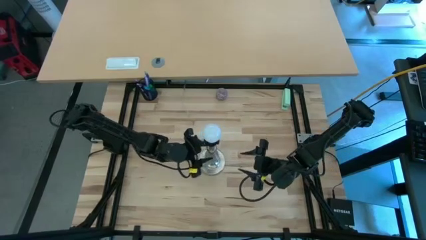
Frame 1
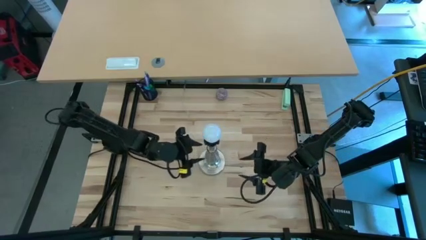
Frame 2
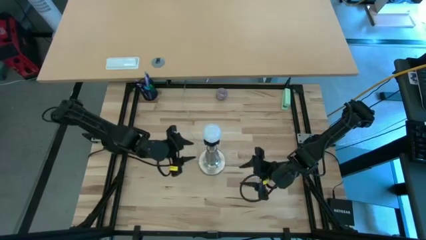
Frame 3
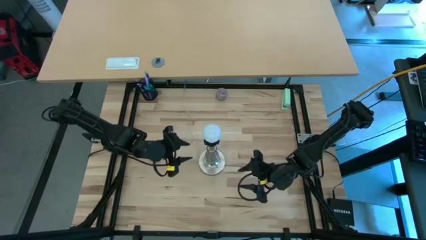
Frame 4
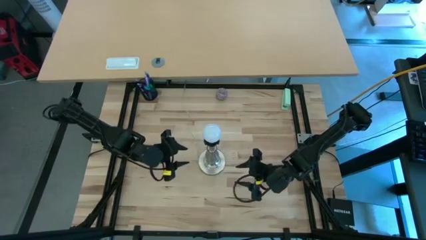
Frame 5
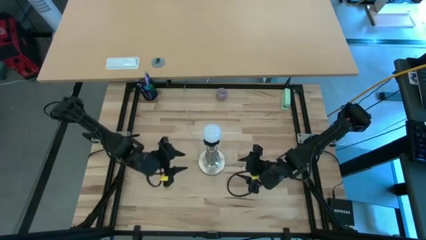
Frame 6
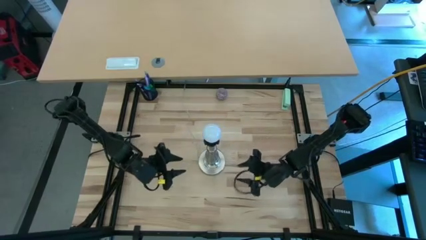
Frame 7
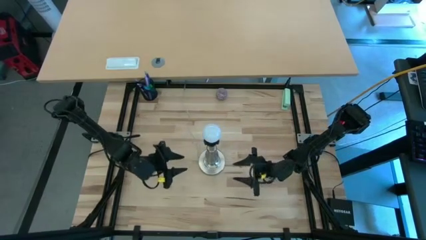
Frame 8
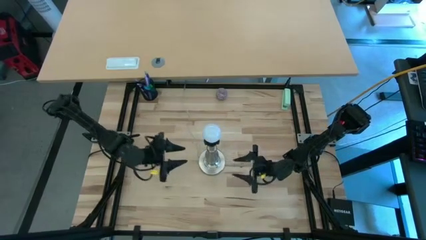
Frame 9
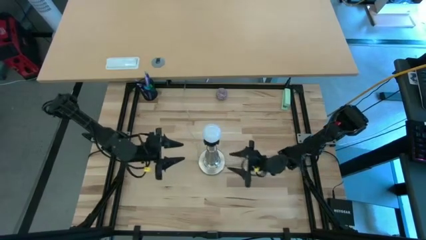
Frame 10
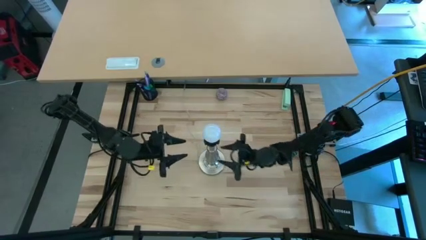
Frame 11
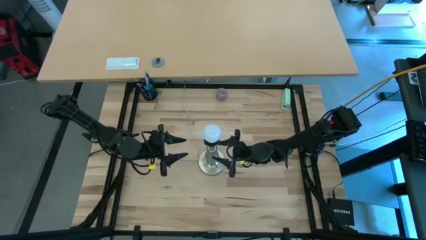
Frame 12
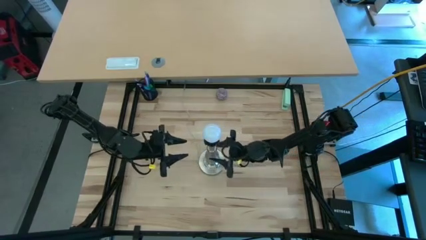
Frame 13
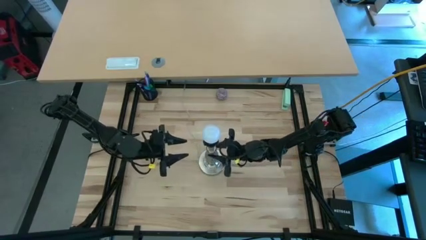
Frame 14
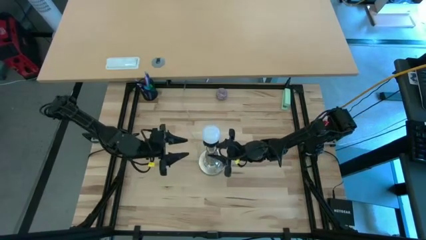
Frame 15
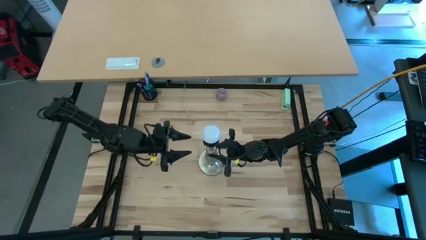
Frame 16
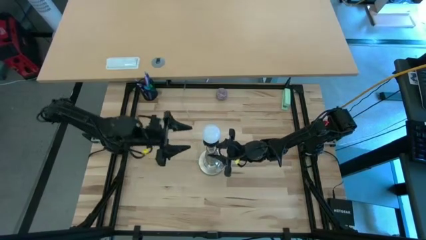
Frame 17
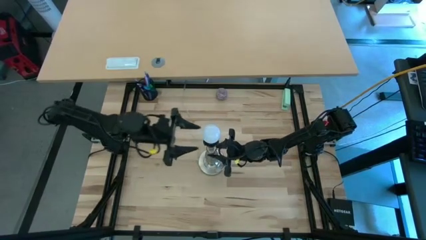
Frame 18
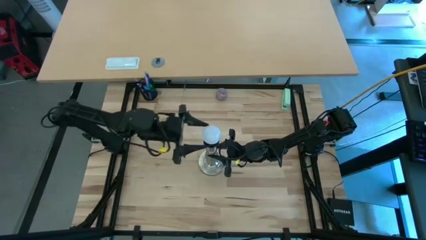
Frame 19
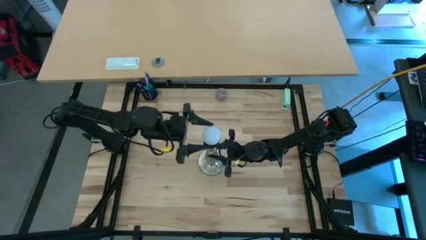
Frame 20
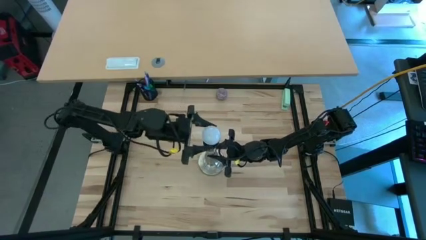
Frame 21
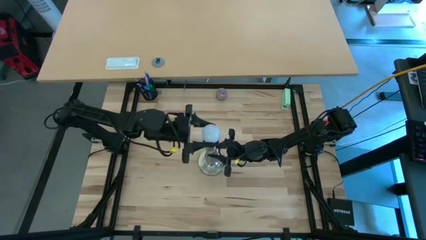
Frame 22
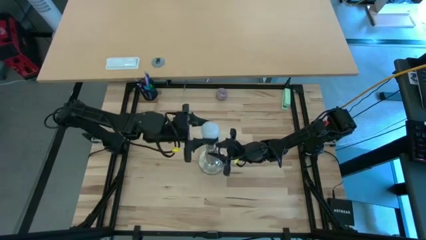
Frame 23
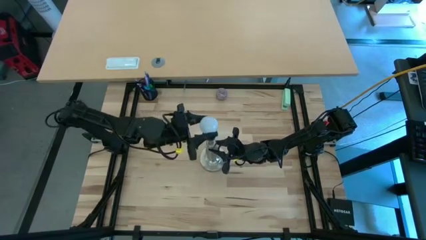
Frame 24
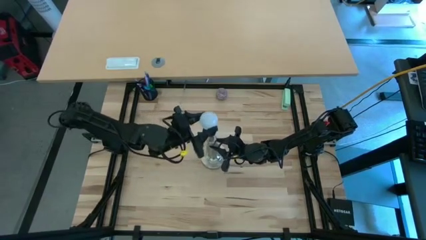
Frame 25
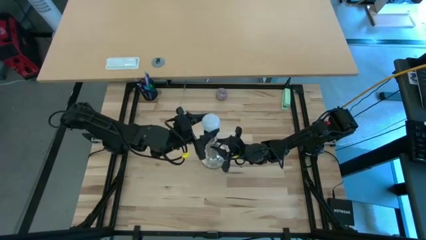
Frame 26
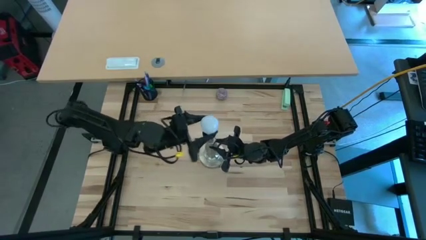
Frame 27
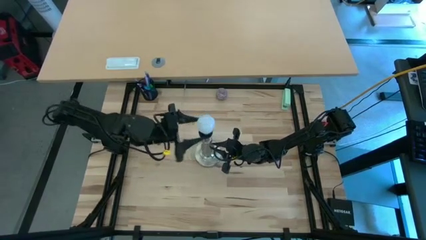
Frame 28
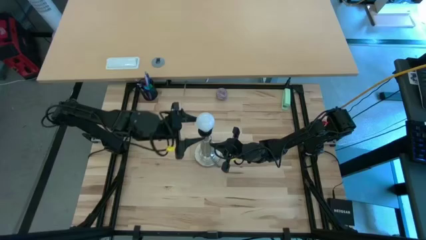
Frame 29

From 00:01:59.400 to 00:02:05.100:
Task: Screw lightbulb
Remove the lightbulb from the silver lamp

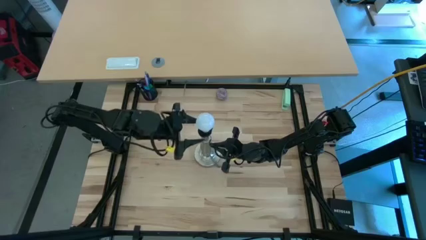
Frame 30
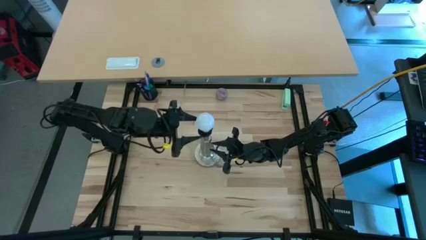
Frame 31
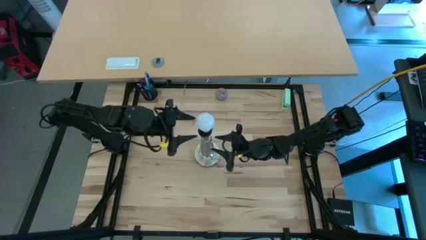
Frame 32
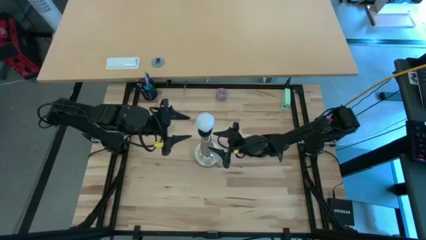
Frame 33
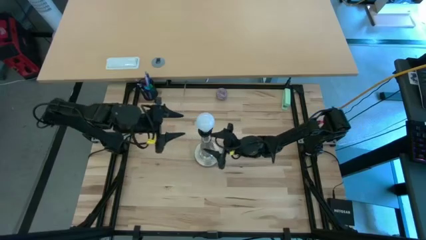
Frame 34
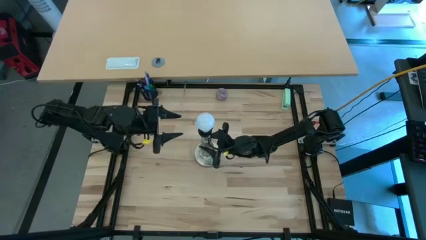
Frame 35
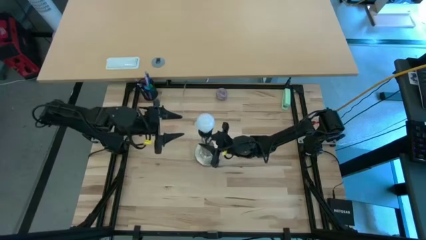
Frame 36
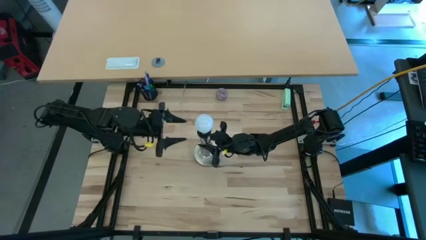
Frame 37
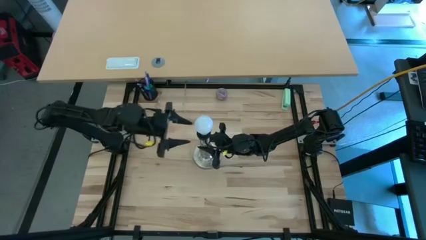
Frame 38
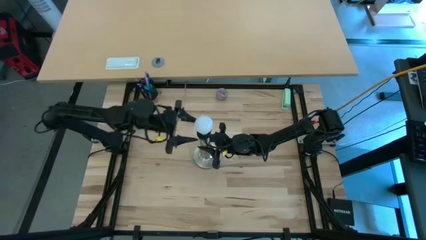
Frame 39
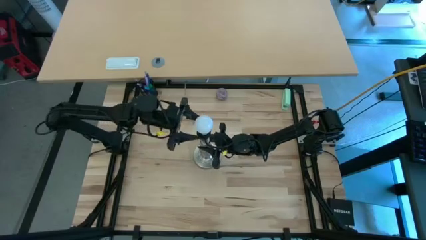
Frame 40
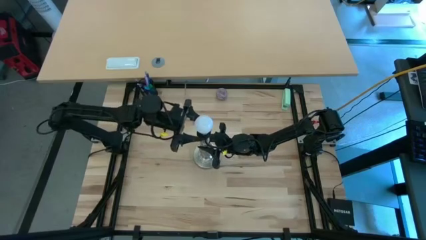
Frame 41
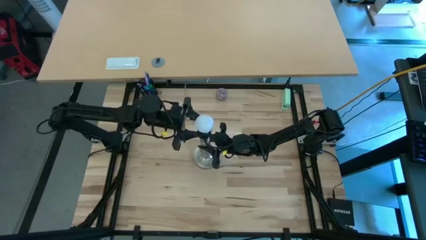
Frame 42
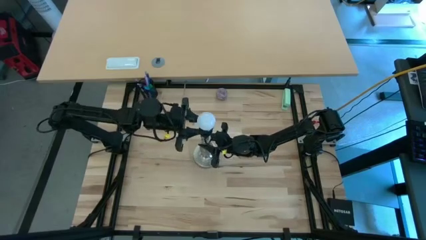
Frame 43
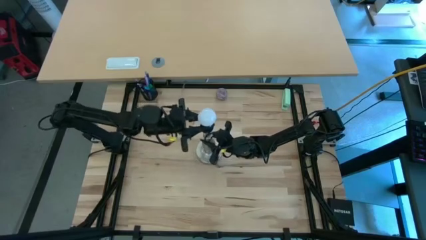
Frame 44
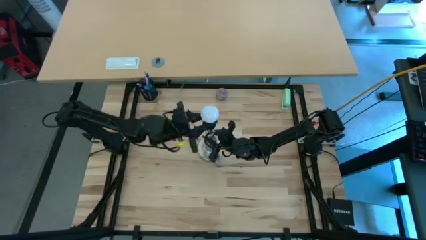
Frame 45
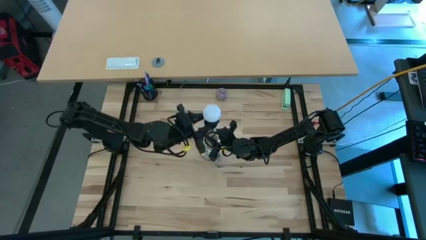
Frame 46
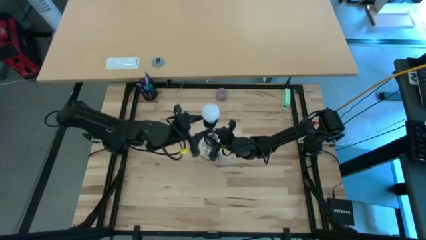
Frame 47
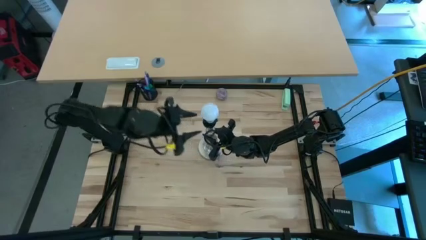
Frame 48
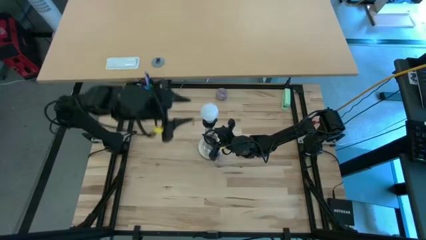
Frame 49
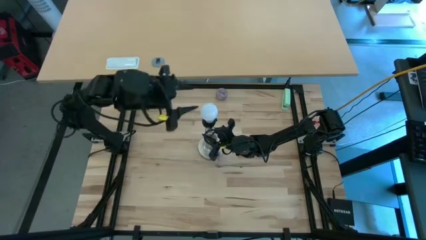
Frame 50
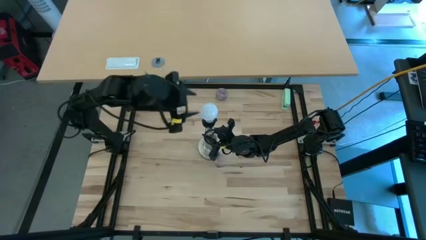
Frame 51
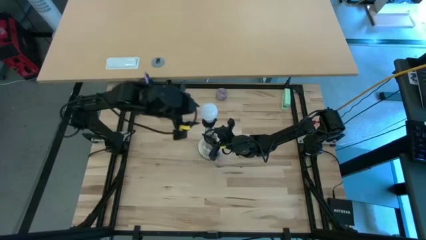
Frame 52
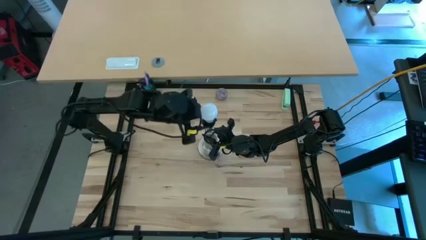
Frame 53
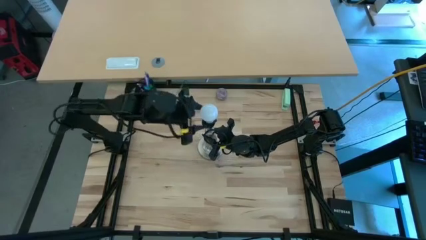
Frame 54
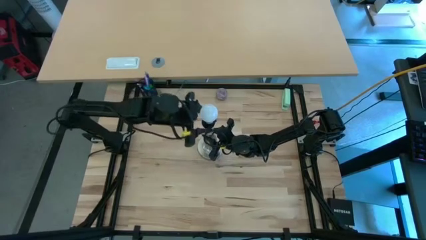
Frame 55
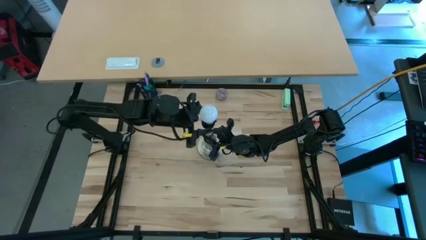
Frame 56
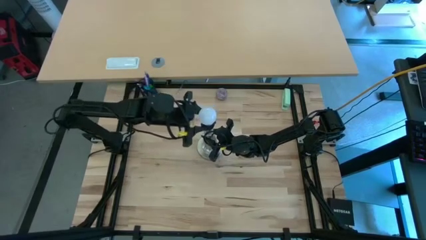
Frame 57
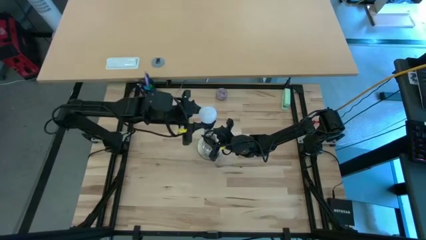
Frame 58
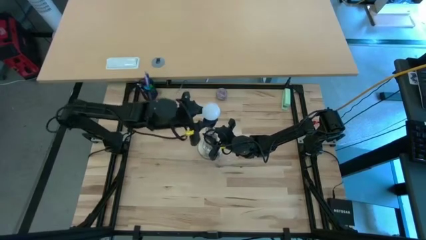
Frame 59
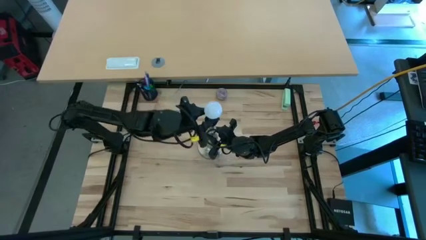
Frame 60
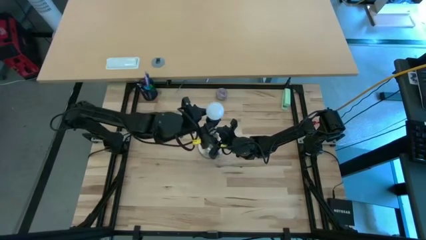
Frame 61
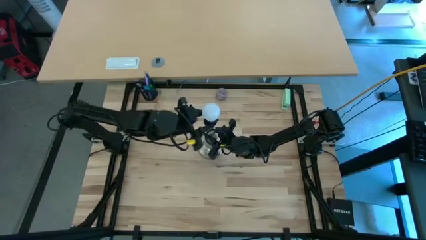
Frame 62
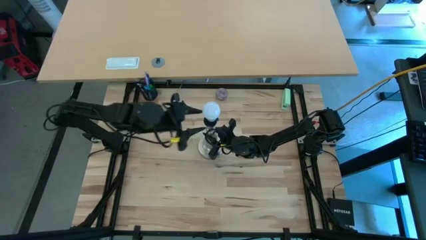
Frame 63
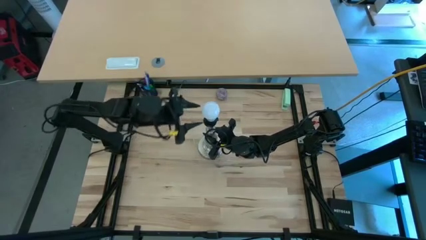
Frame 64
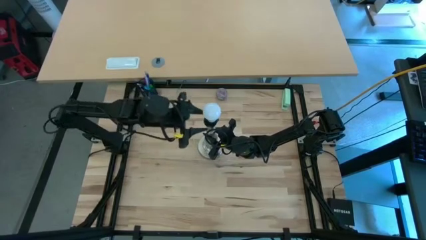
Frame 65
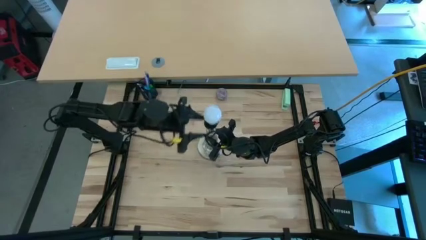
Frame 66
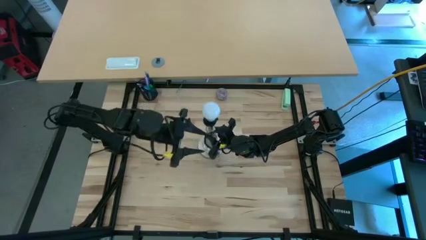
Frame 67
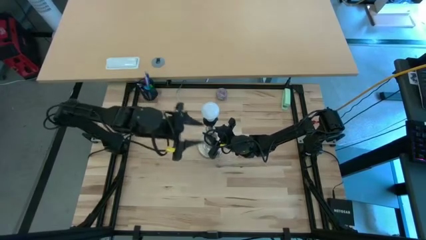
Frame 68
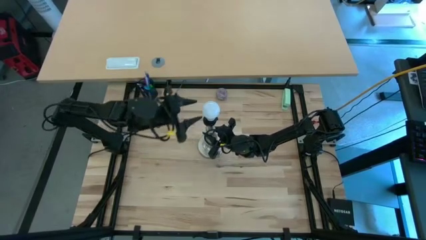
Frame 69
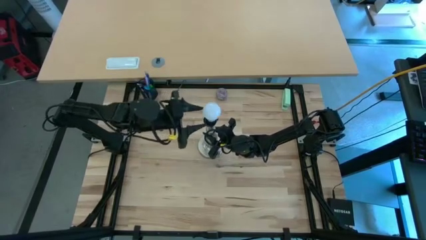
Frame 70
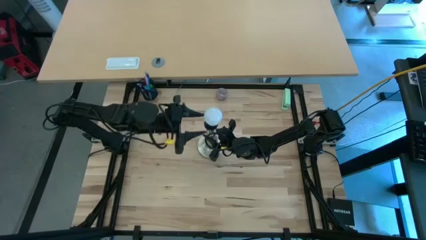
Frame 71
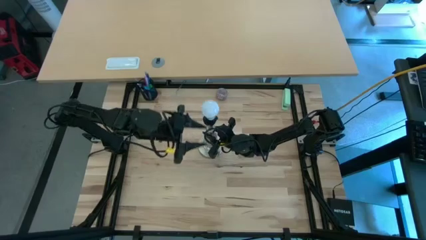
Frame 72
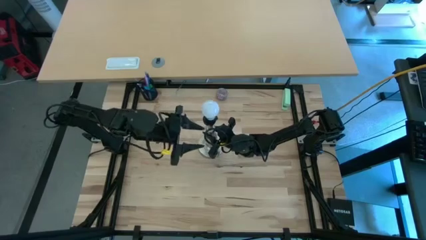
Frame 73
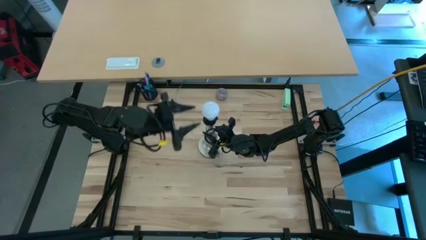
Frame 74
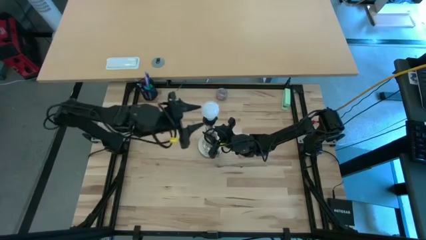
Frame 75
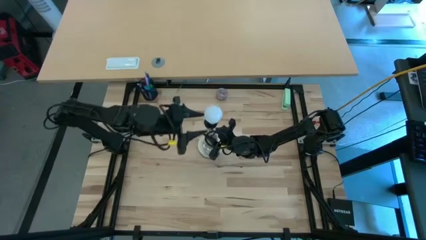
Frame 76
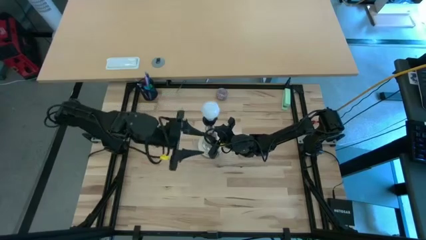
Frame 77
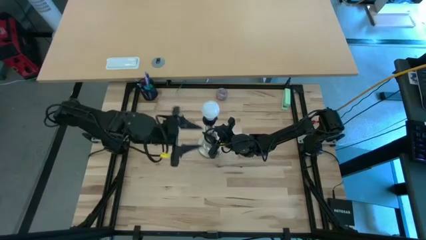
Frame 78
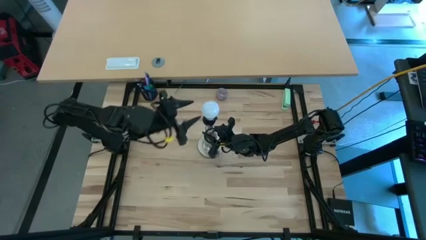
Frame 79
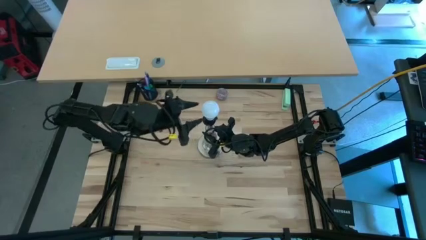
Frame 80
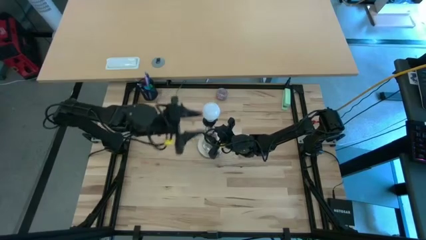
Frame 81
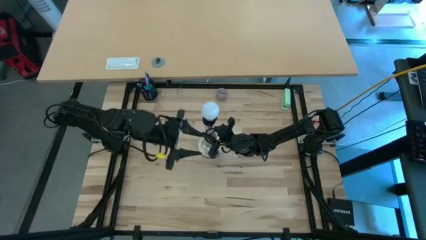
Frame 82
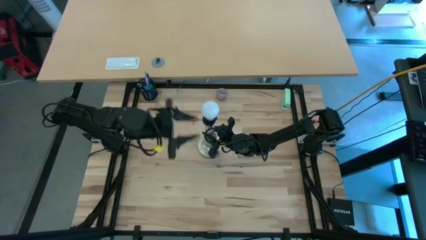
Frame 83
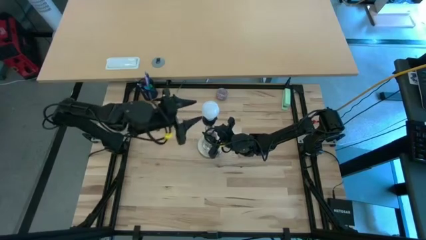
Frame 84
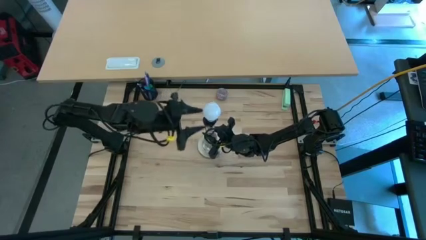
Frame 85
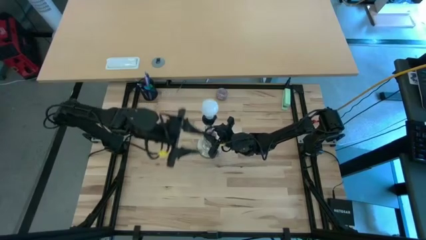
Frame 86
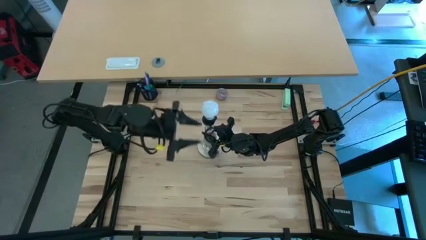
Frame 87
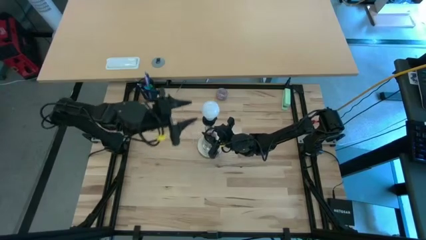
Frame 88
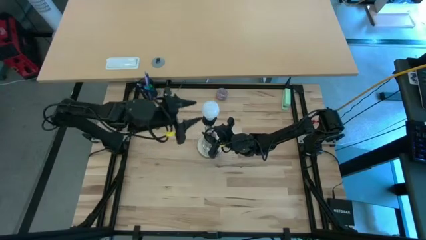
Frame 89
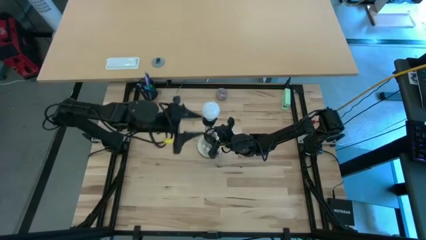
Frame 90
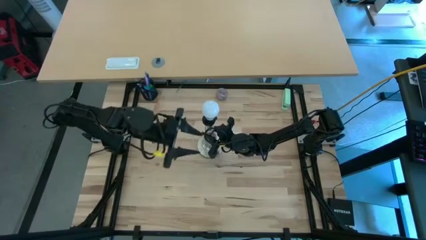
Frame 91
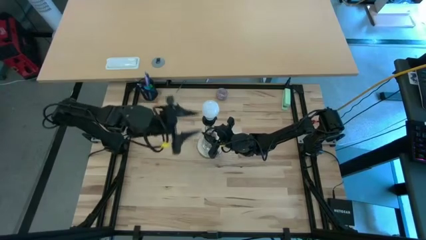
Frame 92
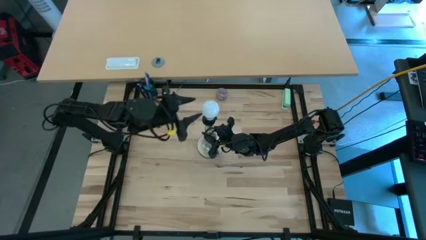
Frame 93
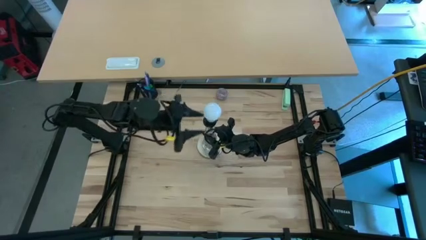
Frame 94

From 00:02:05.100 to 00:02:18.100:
Remove the lightbulb from the silver lamp
